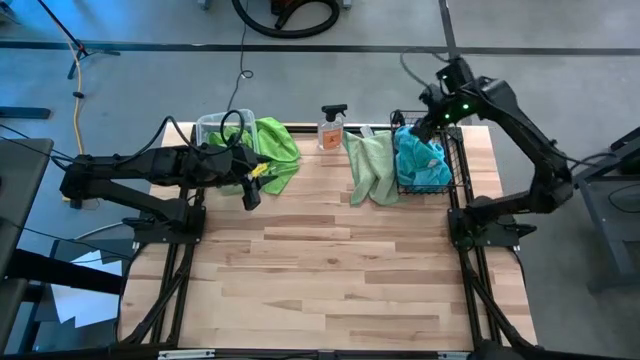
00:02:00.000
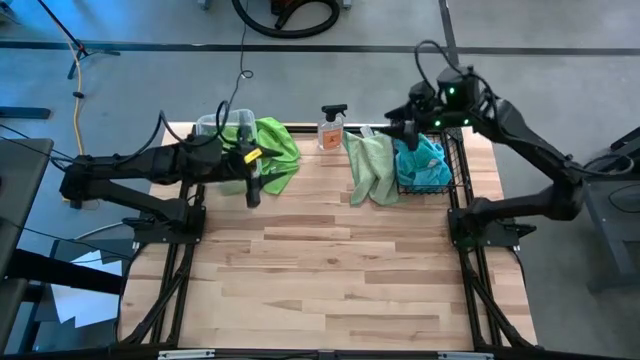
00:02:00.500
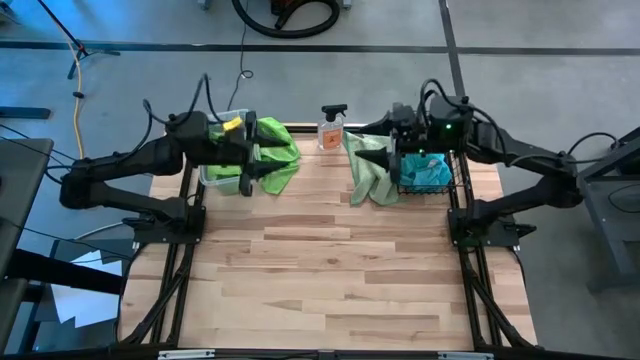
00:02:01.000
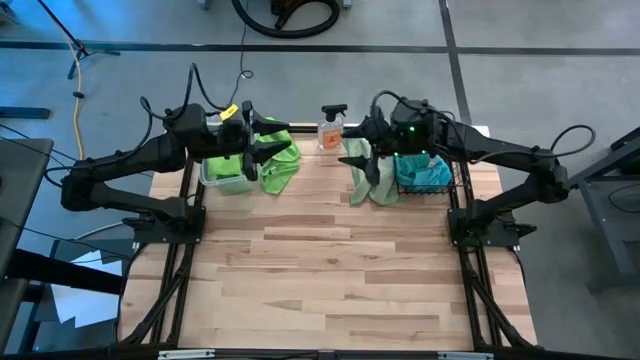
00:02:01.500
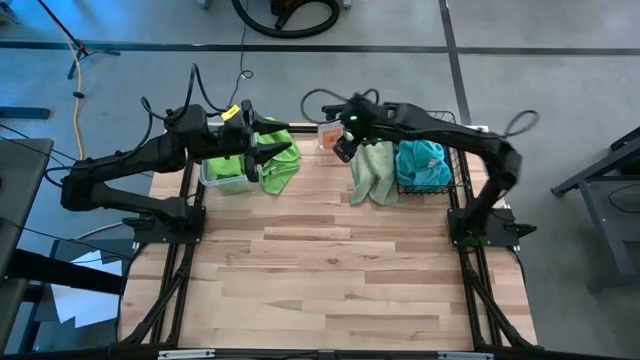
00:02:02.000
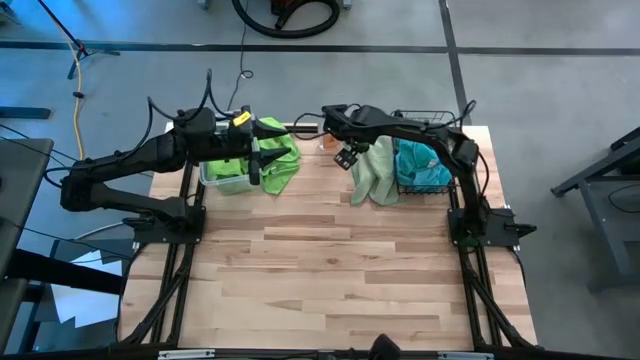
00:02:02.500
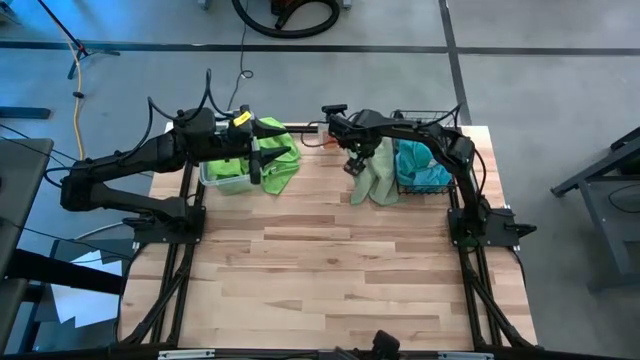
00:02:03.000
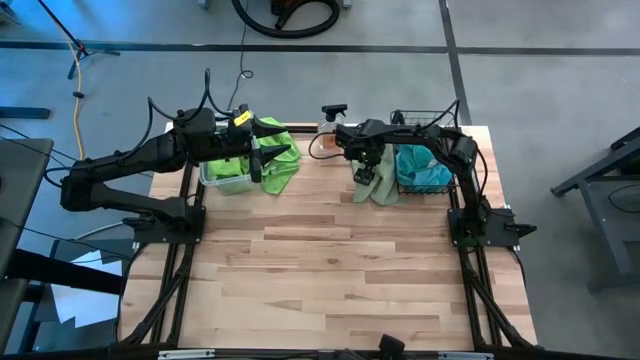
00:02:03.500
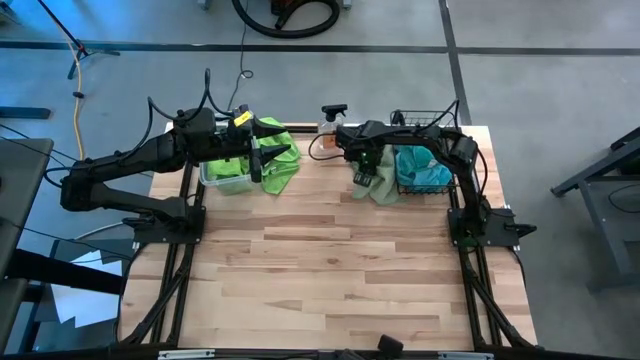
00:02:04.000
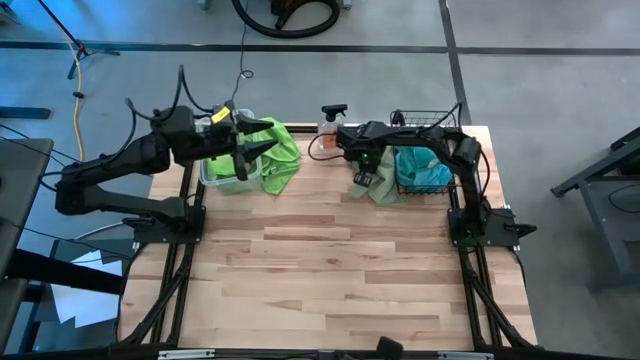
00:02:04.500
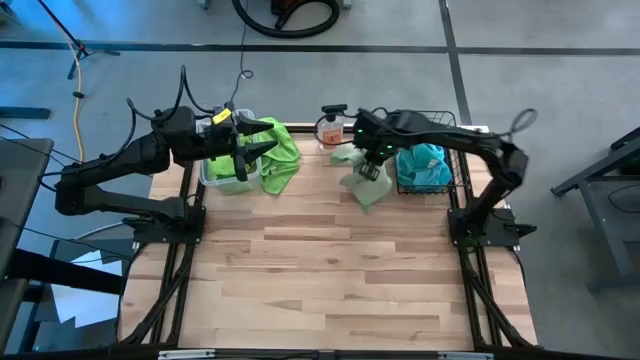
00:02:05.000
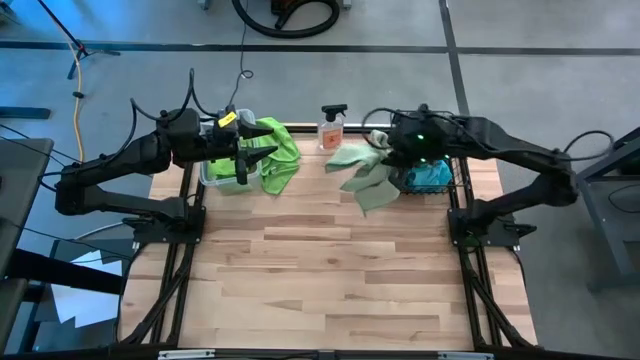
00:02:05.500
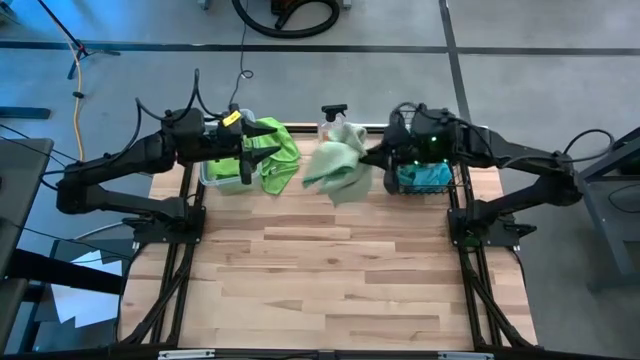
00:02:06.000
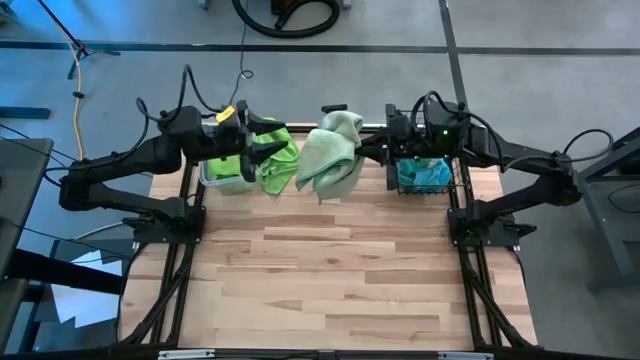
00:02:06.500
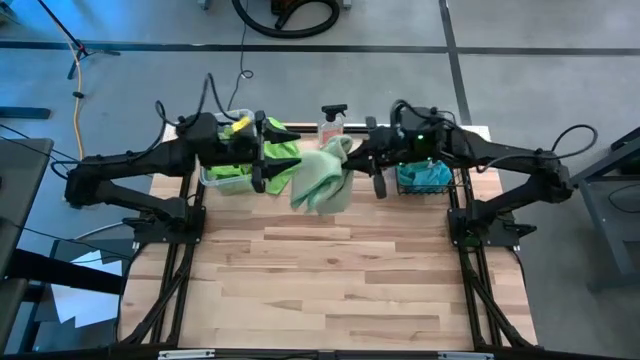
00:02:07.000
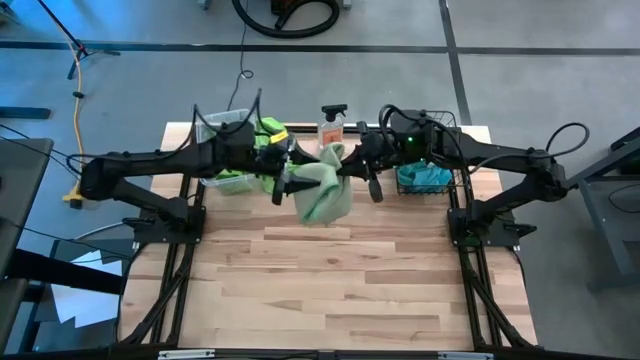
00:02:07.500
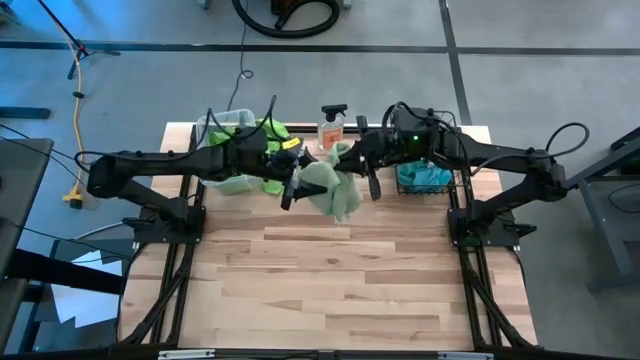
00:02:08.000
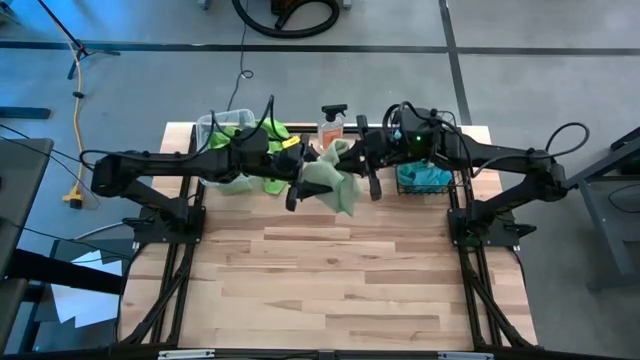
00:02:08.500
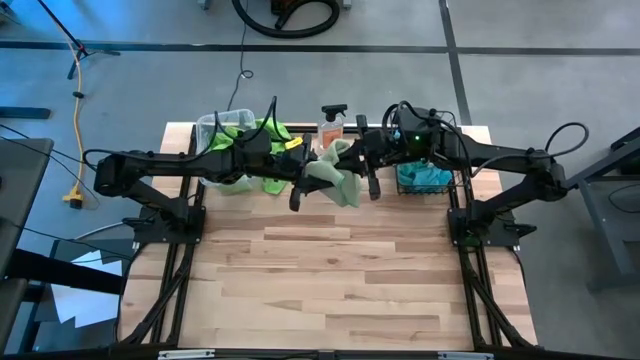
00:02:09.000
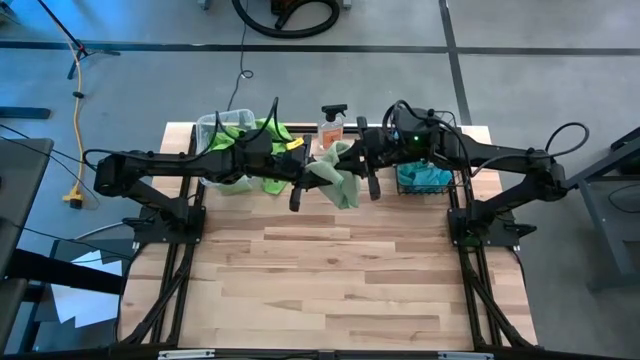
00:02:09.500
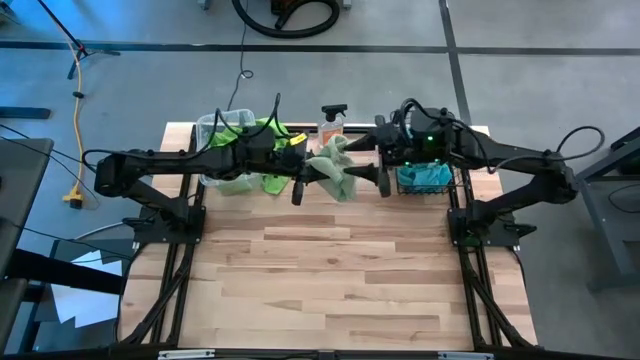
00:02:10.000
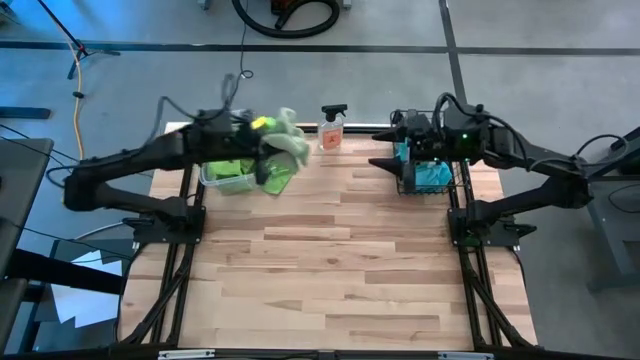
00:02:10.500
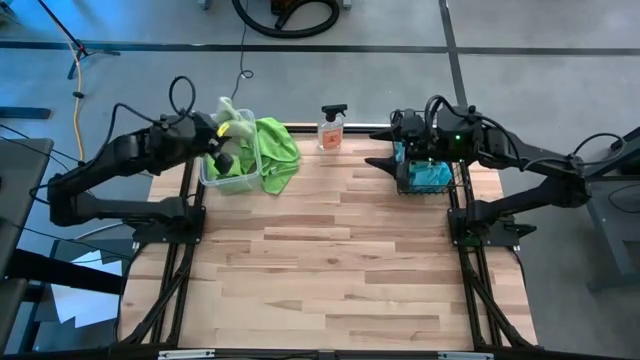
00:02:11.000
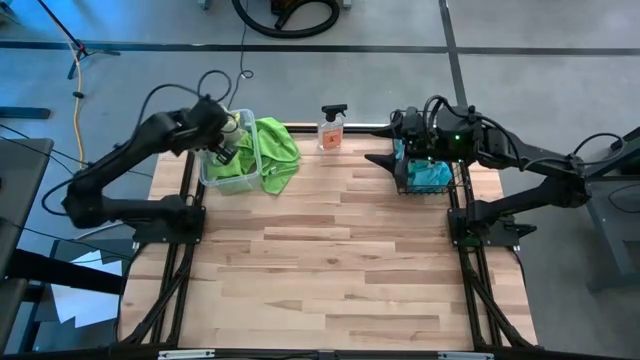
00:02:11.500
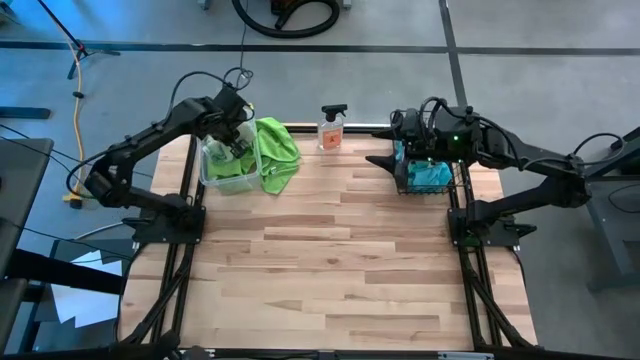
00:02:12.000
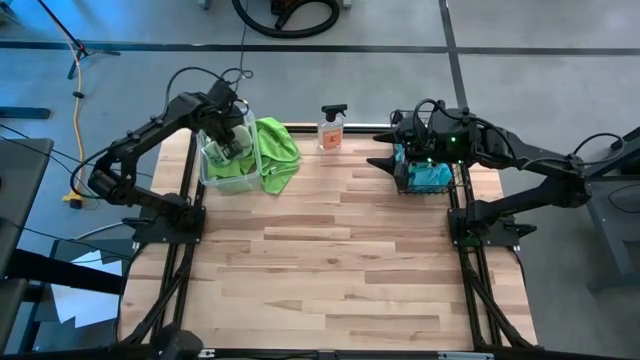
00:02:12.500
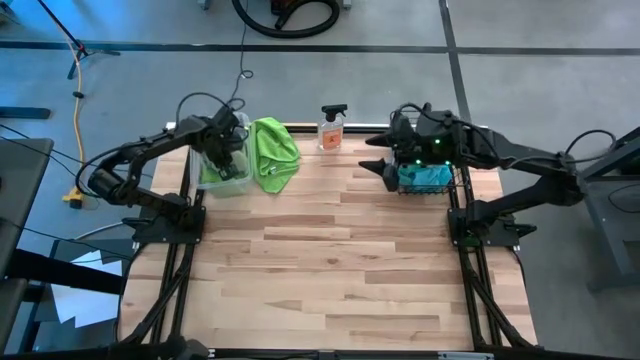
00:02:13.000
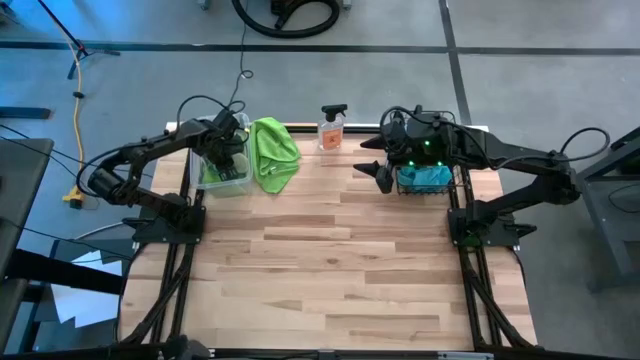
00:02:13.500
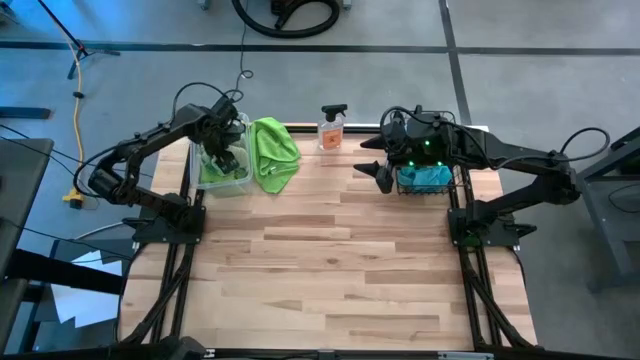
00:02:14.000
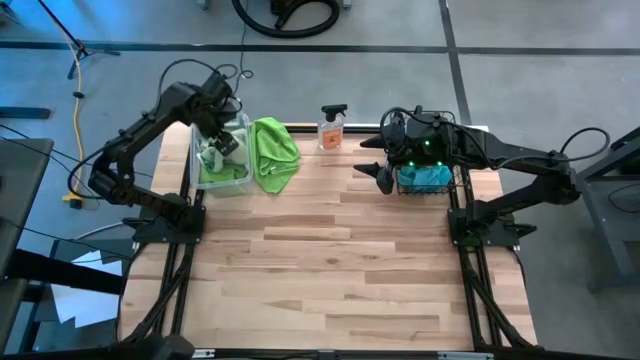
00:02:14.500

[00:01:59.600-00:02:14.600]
Task: Sort microfiber towel by color & place in baskets
Put the light green microfiber cloth into the bin

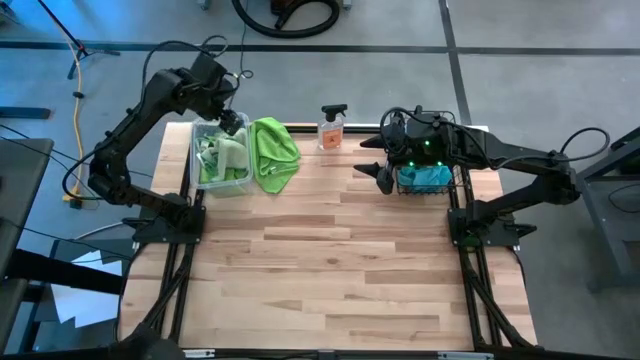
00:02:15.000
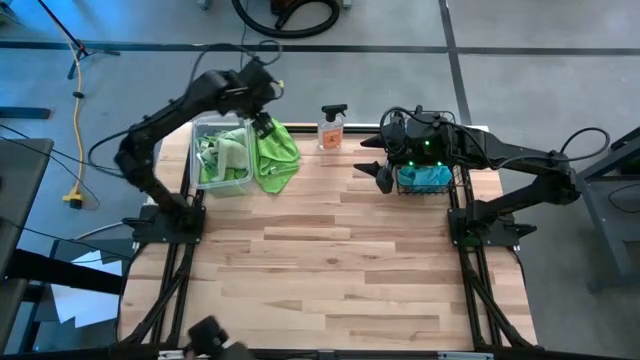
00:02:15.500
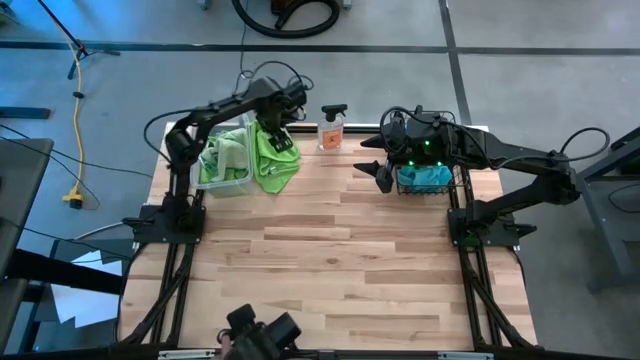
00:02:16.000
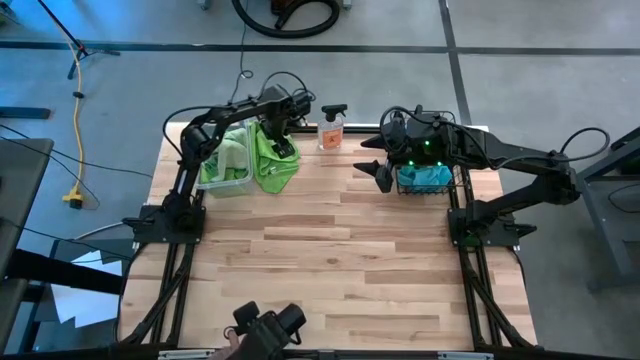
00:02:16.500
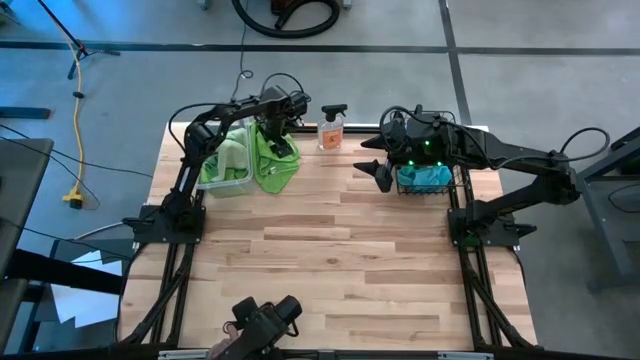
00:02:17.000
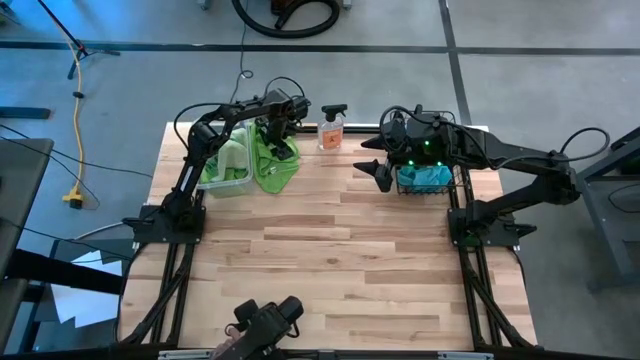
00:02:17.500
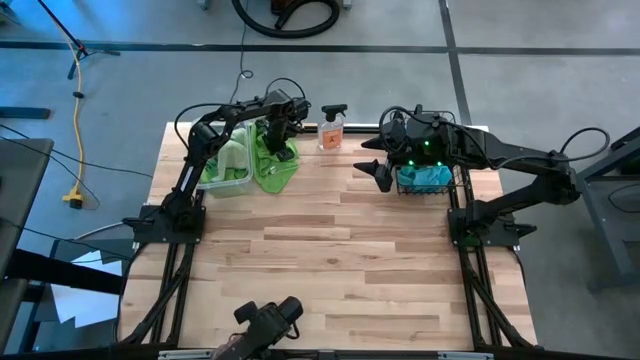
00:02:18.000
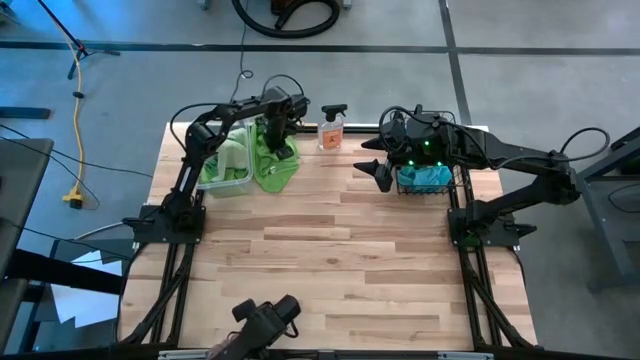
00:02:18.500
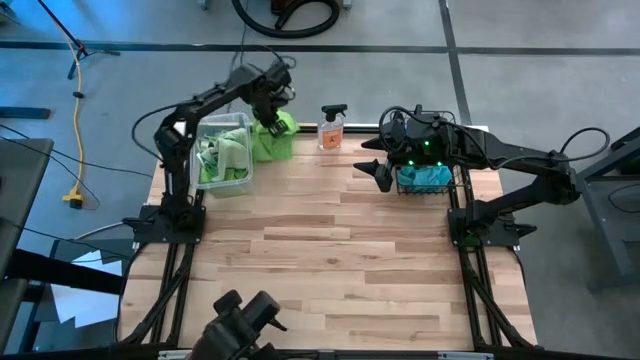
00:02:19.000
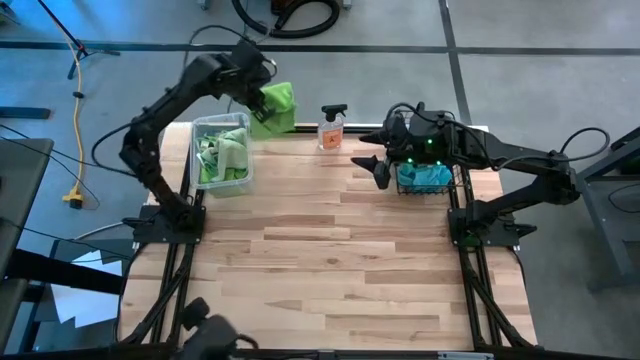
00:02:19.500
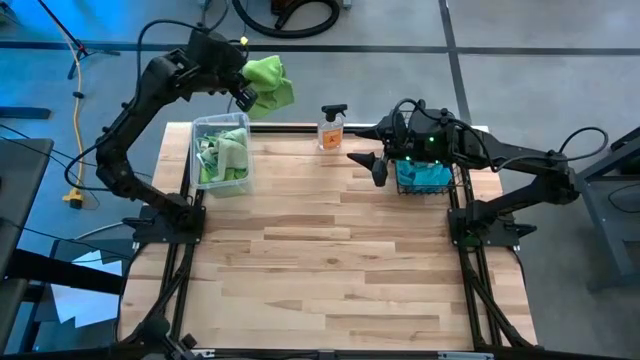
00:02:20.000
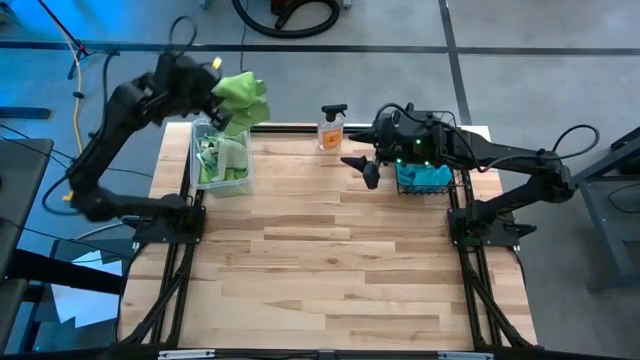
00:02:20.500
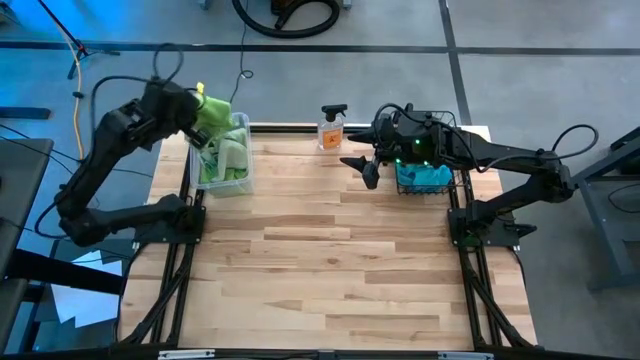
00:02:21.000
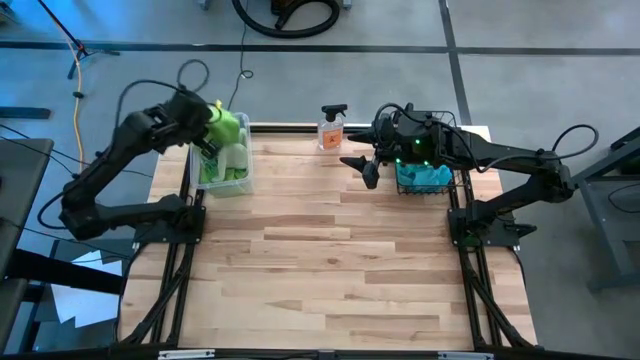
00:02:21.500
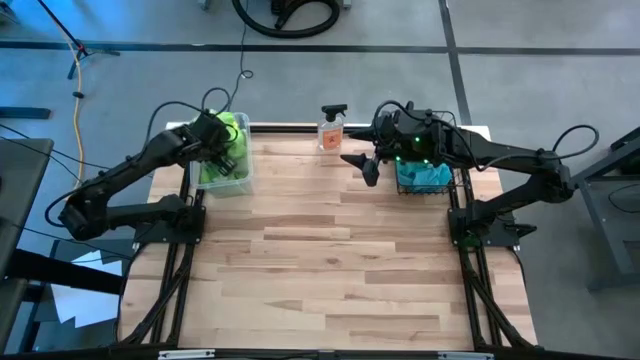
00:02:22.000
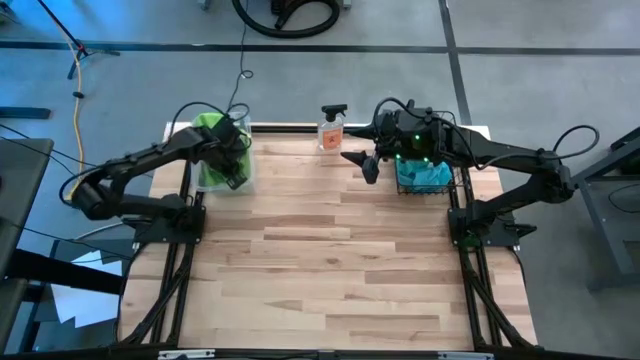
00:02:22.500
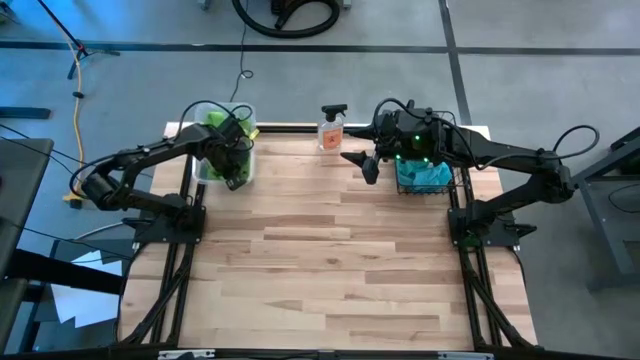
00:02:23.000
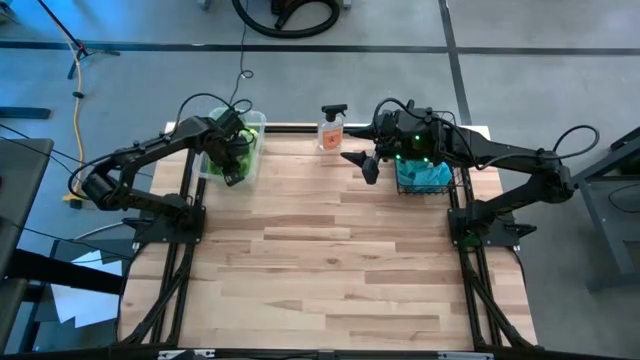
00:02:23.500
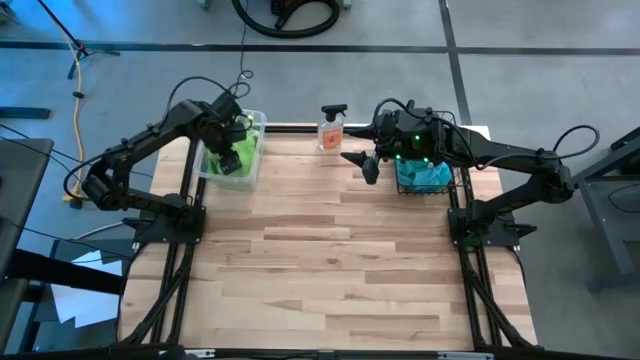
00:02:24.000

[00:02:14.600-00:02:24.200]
Put the green microfiber cloth into the bin
